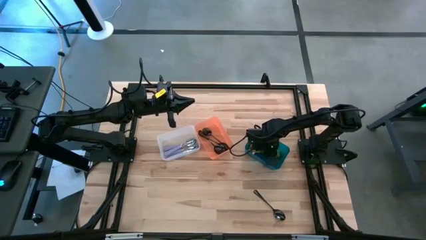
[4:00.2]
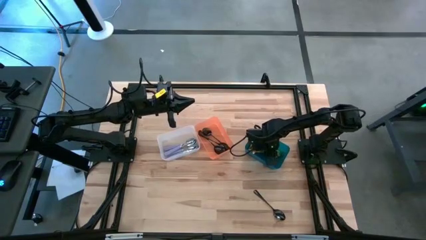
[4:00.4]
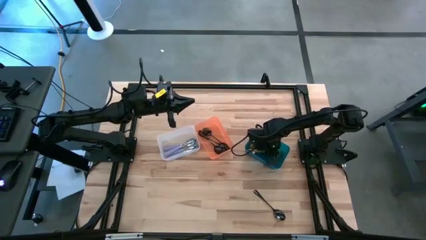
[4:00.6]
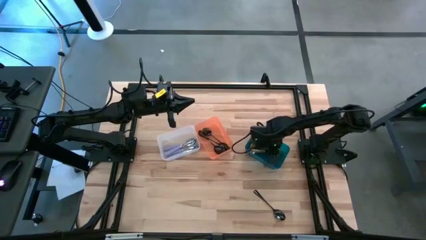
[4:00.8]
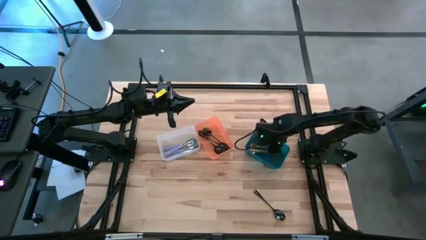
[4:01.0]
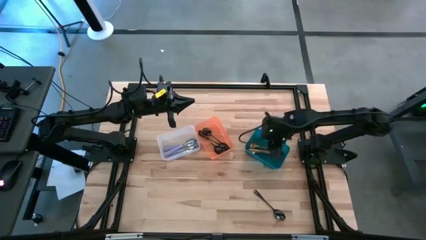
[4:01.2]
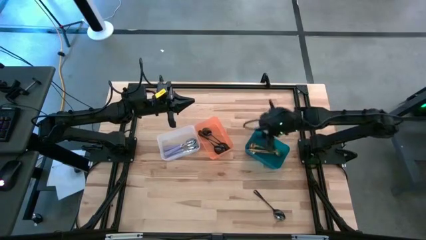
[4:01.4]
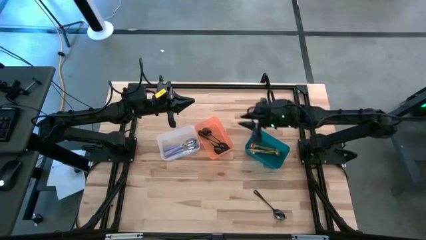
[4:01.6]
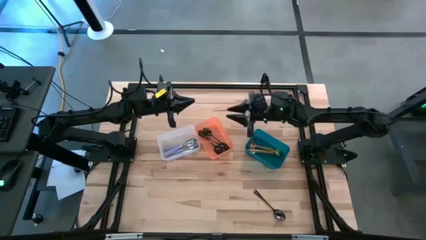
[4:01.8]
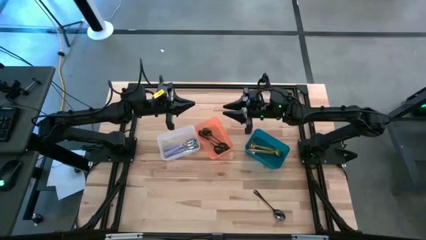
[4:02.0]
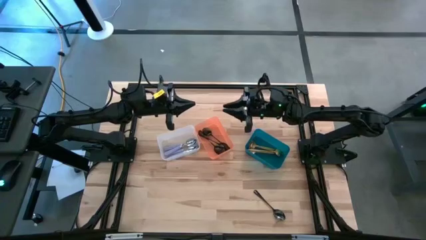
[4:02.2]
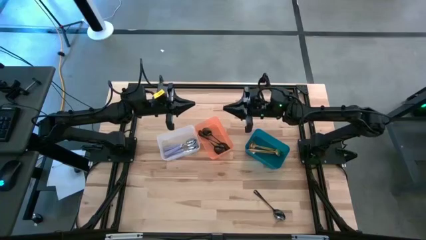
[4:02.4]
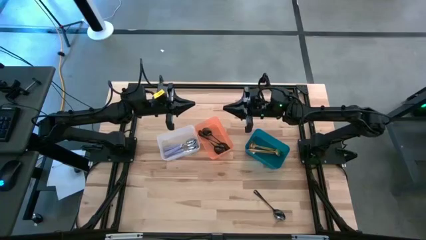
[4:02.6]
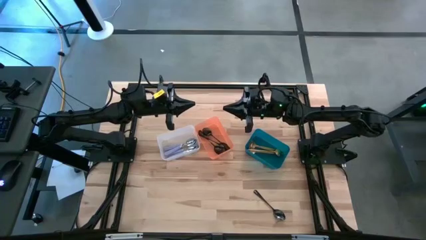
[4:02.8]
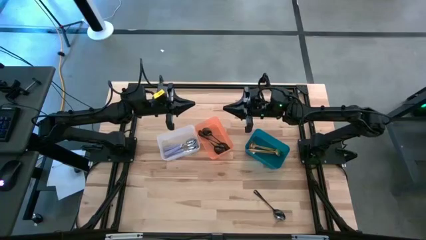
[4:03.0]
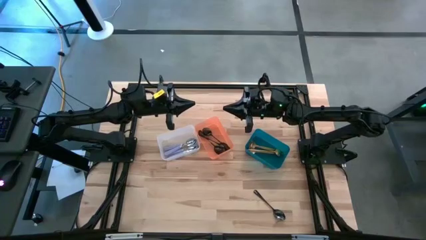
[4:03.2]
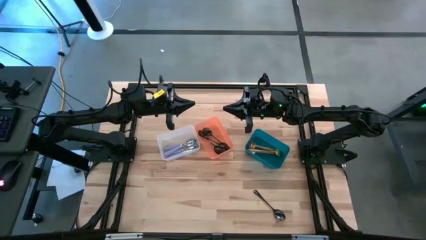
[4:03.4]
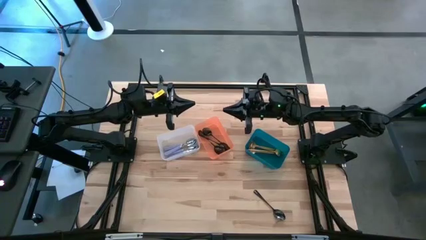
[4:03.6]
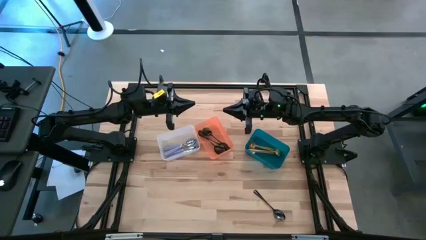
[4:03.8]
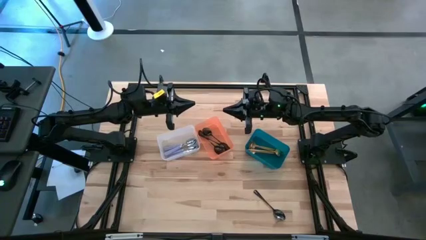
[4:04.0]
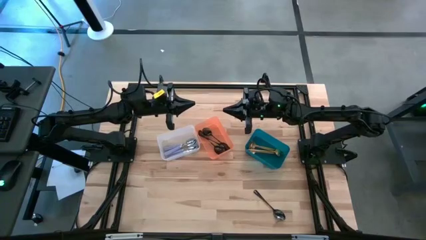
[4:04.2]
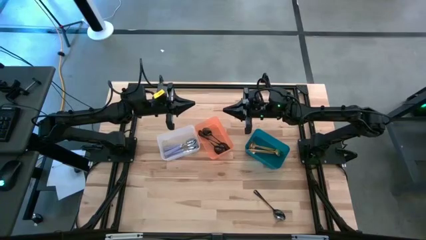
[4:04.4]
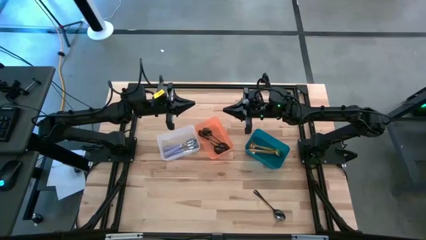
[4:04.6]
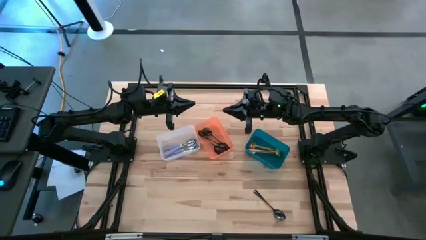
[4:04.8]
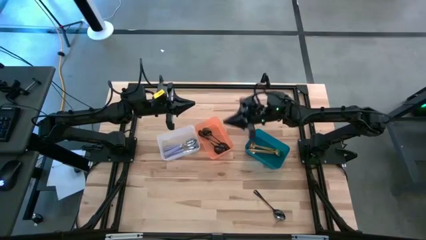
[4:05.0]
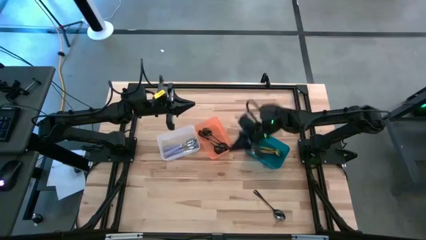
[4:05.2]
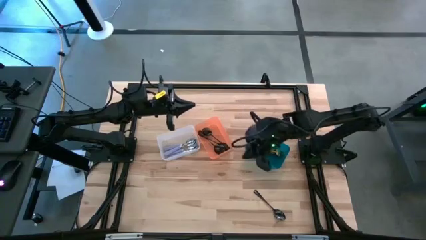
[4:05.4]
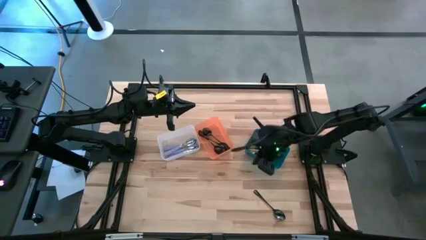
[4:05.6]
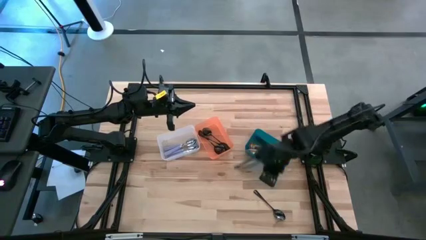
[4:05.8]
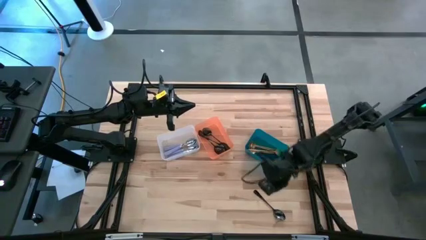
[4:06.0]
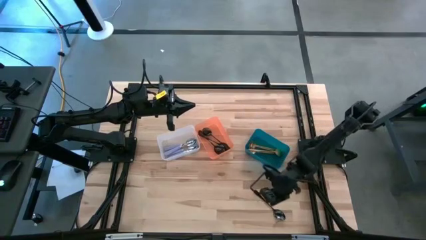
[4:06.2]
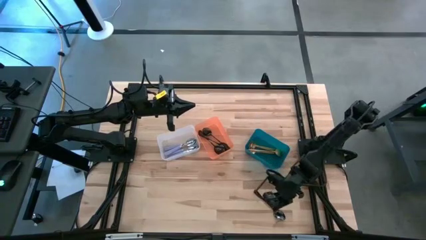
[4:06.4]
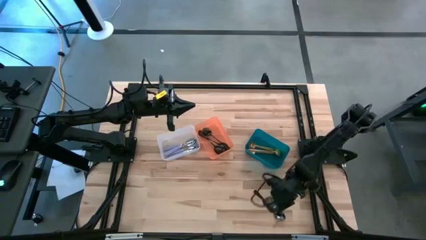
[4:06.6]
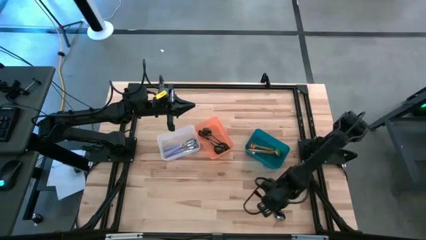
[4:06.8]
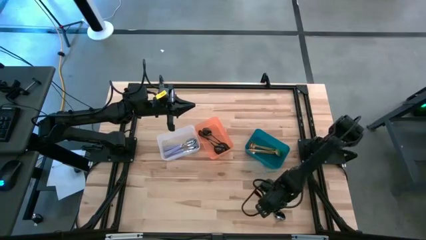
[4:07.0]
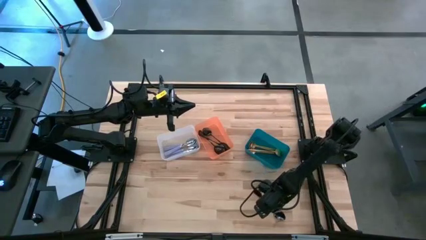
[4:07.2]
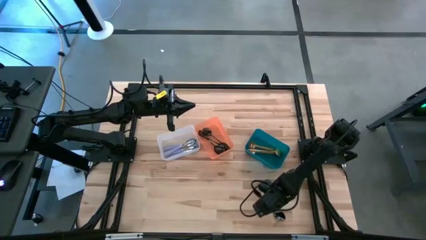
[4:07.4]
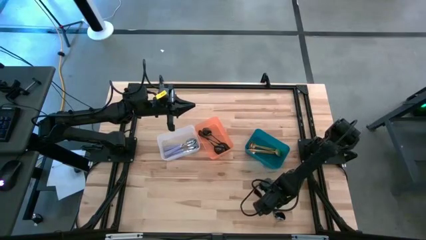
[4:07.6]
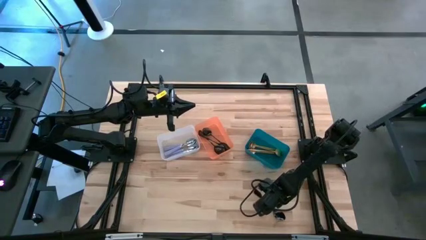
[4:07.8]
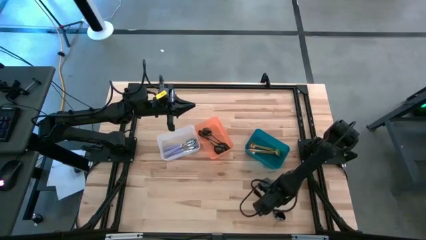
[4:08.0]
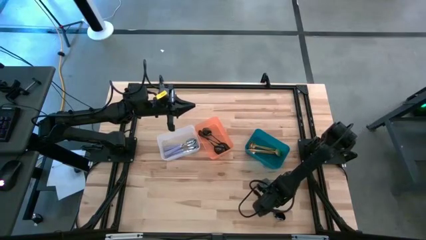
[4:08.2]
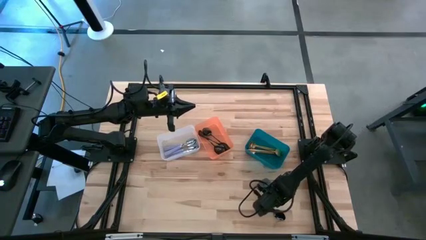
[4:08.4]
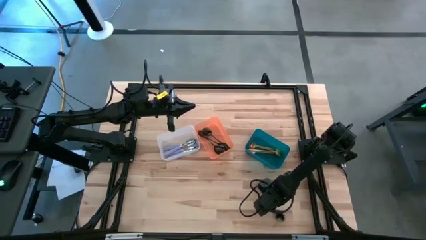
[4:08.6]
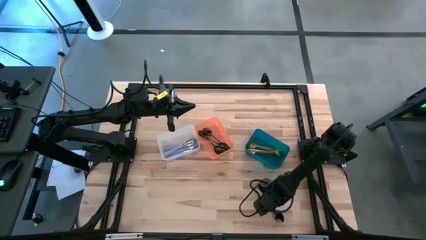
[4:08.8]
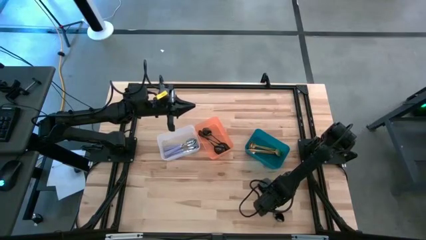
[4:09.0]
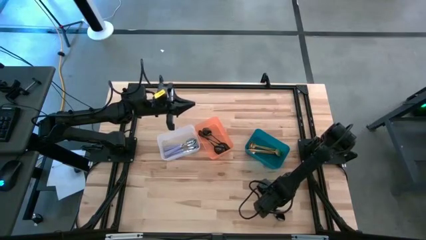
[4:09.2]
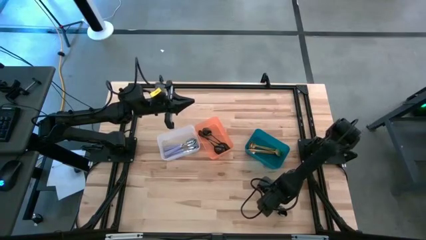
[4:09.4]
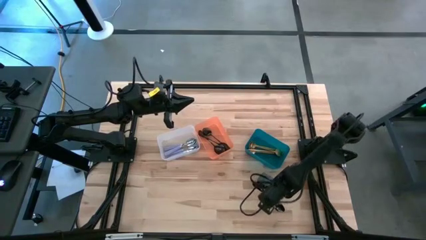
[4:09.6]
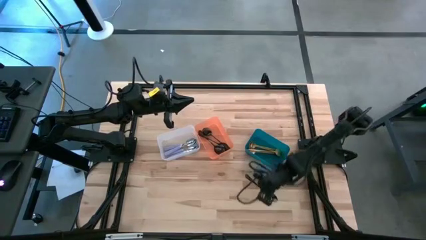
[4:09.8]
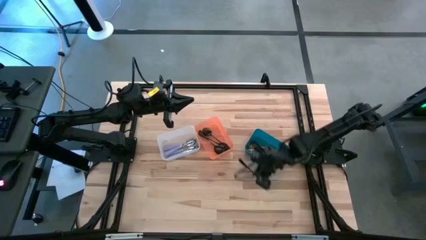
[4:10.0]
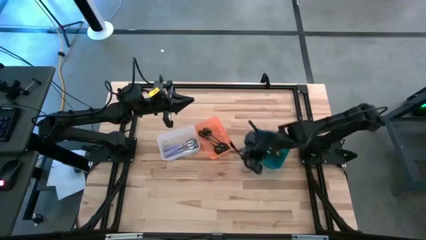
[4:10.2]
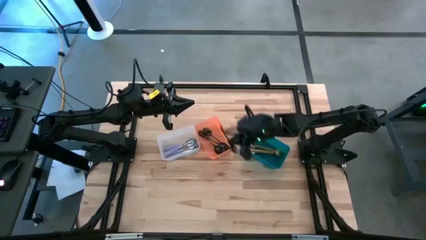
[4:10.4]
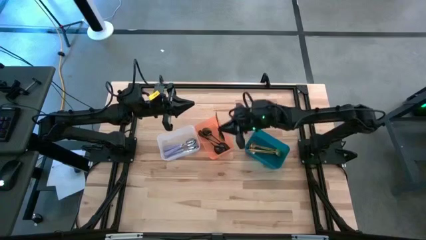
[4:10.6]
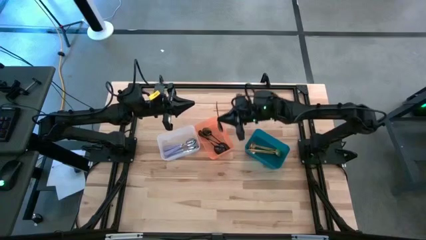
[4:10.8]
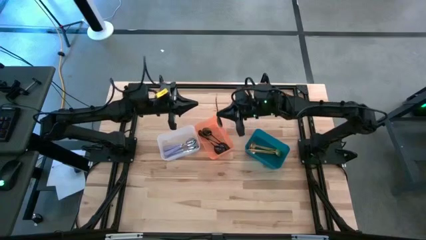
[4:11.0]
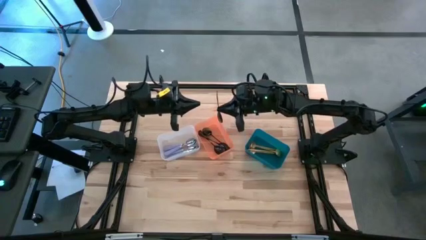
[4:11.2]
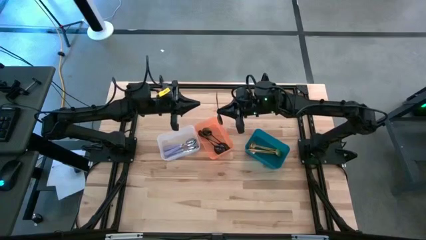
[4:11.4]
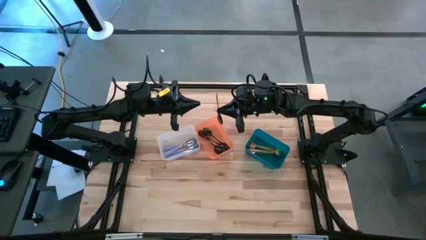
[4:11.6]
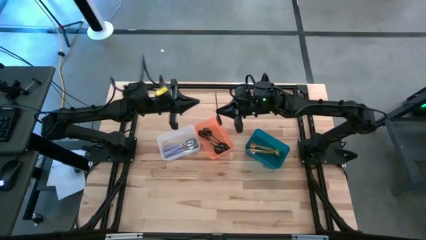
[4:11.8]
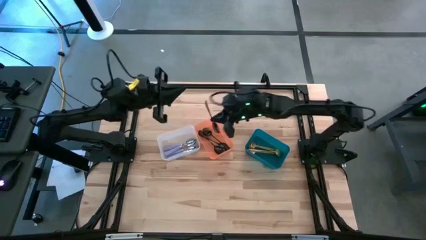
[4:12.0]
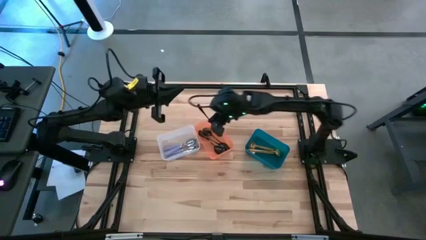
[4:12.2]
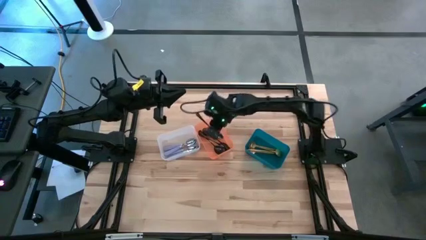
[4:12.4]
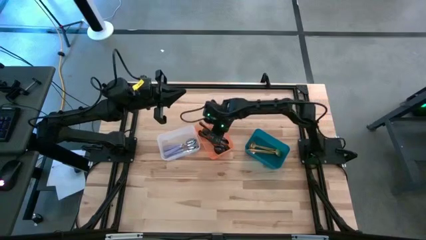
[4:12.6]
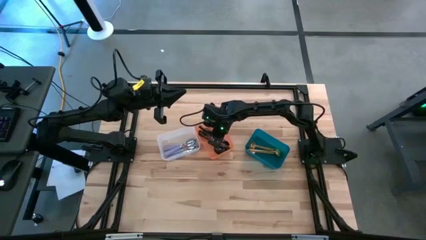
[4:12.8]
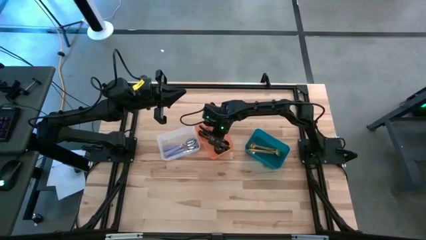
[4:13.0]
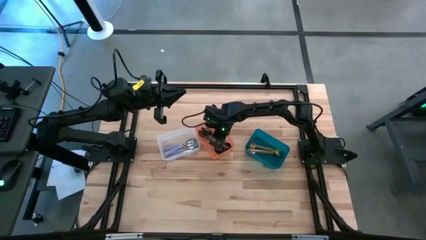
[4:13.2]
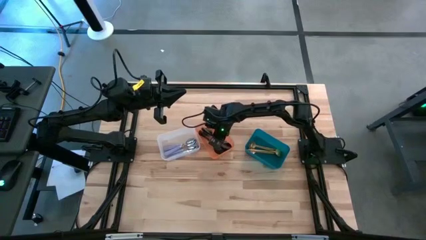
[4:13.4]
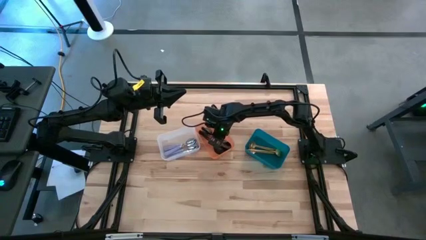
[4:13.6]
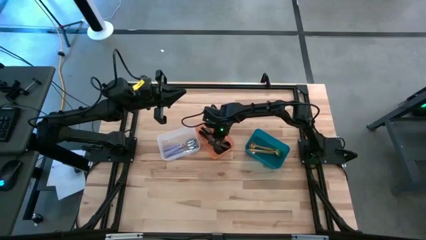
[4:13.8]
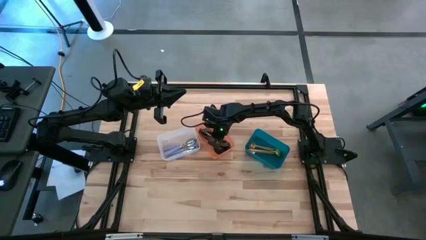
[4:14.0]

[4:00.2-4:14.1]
Task: Sort silverware by color (type)
Put the black spoon into the orange bin
